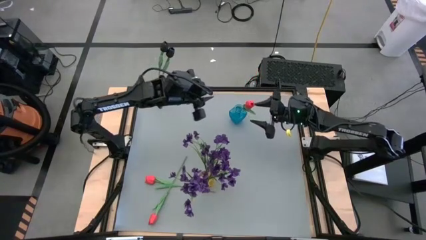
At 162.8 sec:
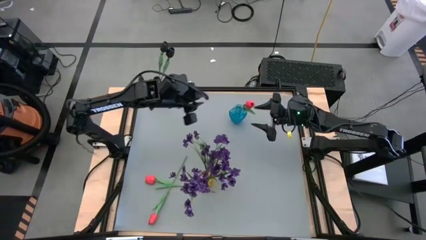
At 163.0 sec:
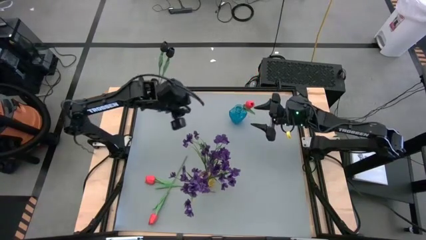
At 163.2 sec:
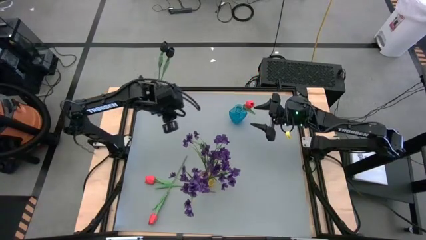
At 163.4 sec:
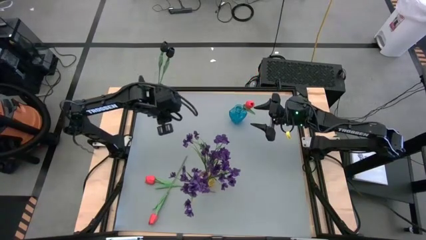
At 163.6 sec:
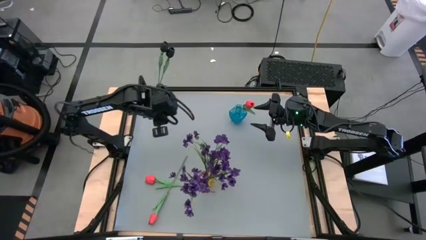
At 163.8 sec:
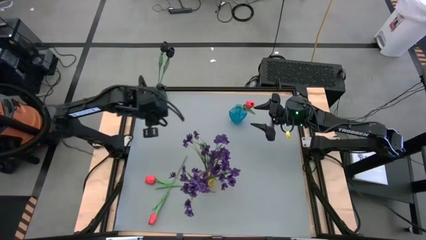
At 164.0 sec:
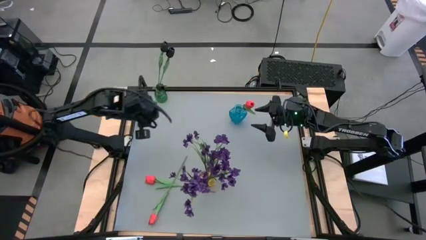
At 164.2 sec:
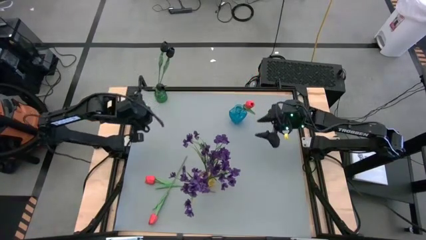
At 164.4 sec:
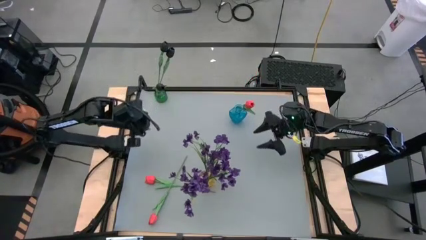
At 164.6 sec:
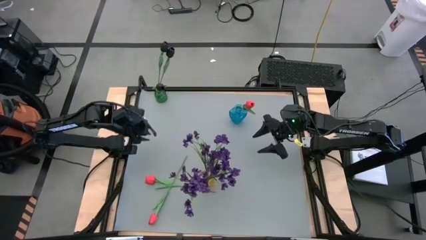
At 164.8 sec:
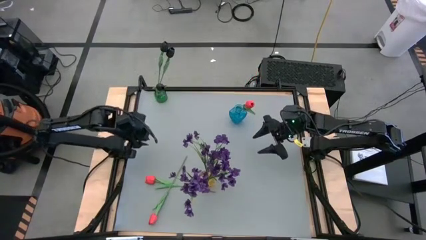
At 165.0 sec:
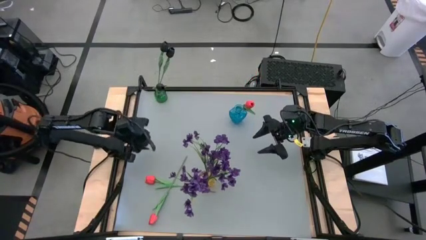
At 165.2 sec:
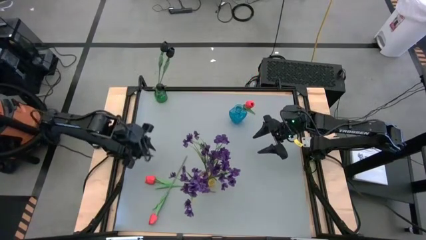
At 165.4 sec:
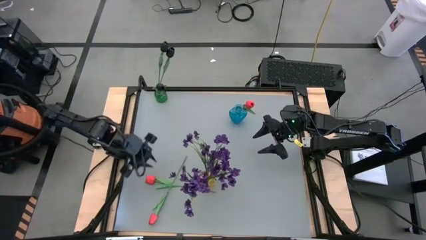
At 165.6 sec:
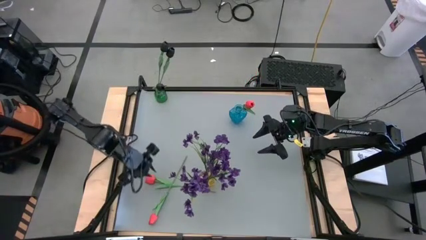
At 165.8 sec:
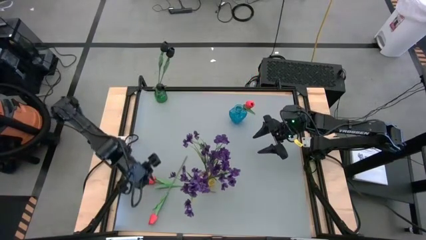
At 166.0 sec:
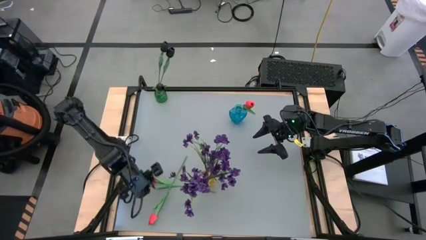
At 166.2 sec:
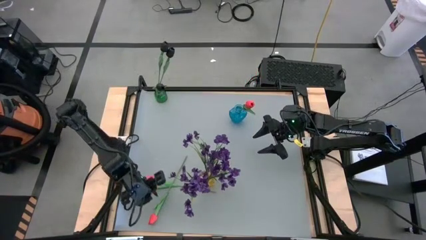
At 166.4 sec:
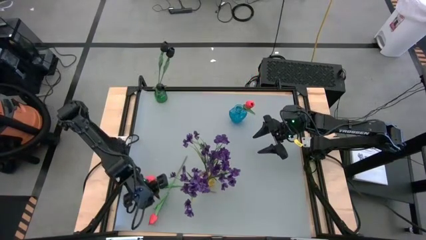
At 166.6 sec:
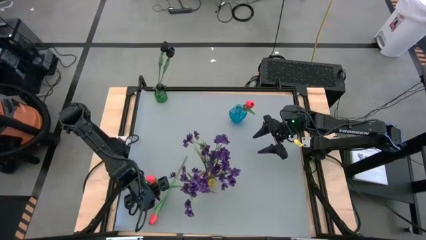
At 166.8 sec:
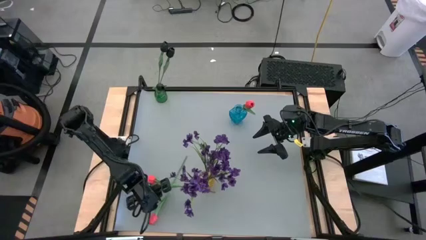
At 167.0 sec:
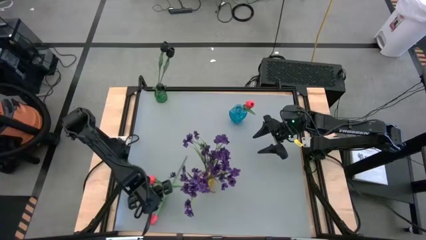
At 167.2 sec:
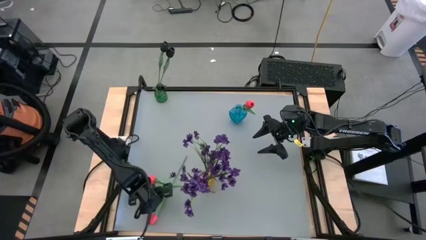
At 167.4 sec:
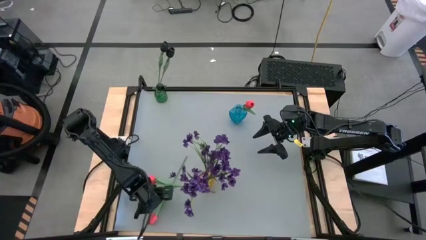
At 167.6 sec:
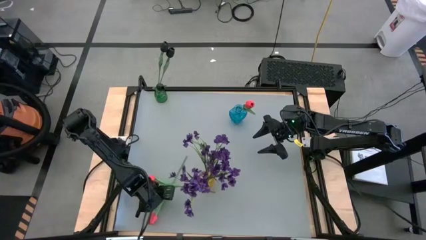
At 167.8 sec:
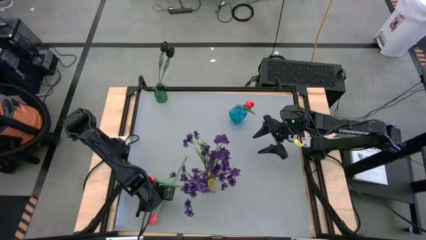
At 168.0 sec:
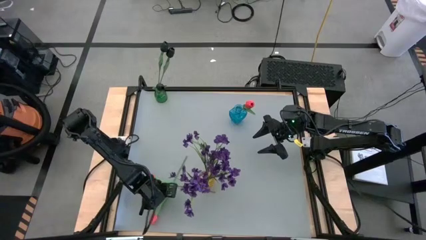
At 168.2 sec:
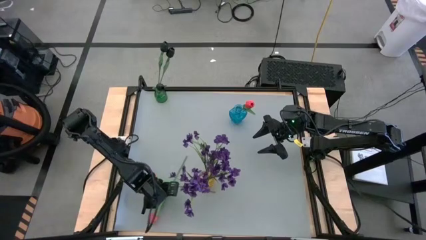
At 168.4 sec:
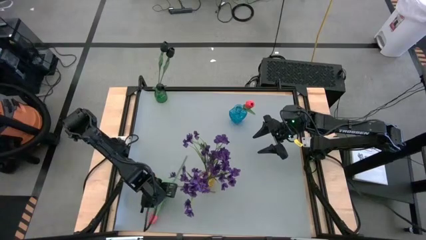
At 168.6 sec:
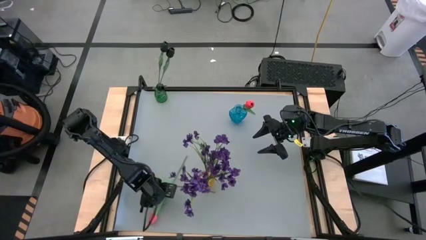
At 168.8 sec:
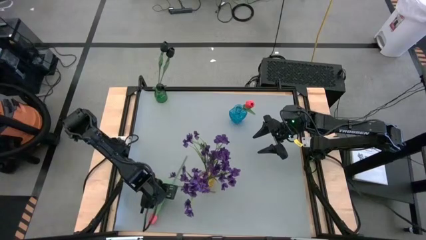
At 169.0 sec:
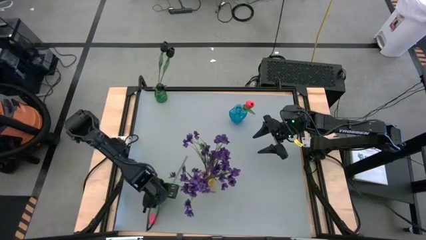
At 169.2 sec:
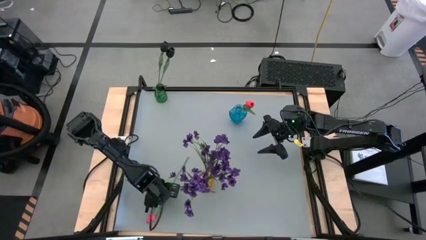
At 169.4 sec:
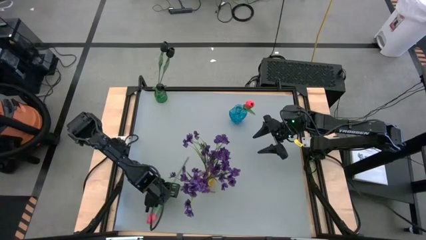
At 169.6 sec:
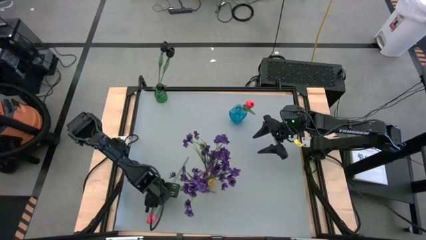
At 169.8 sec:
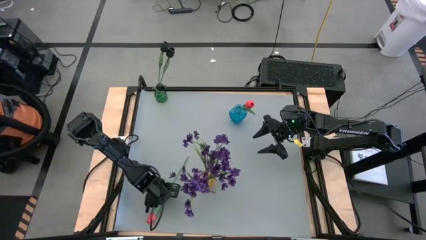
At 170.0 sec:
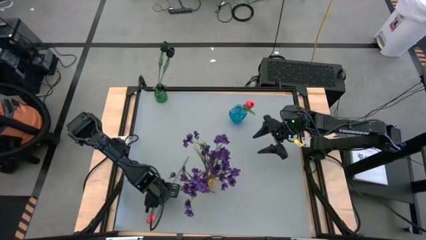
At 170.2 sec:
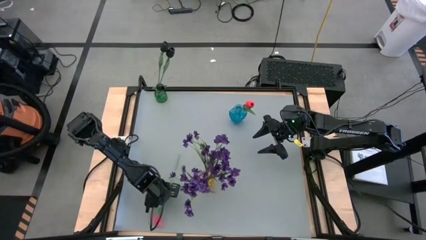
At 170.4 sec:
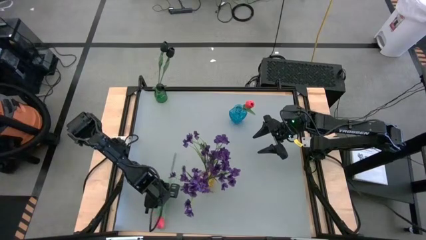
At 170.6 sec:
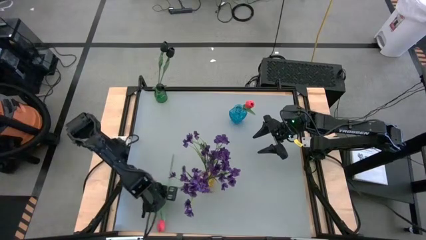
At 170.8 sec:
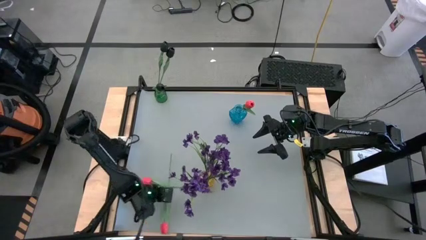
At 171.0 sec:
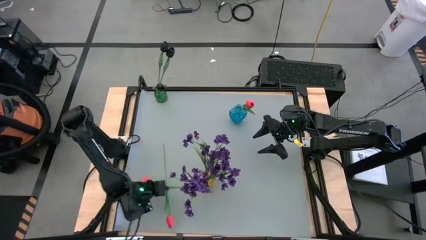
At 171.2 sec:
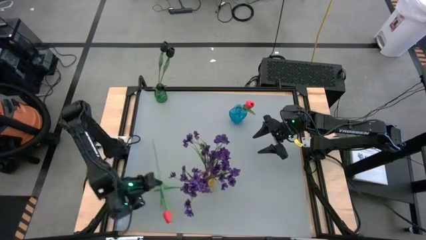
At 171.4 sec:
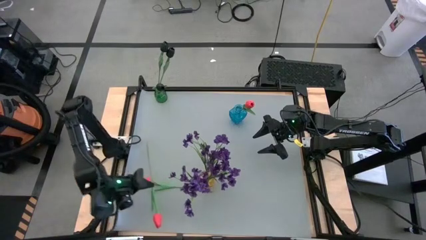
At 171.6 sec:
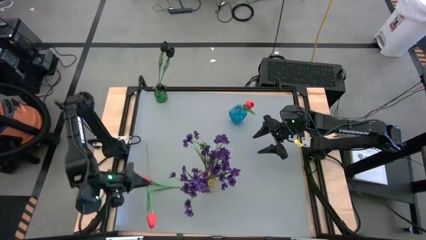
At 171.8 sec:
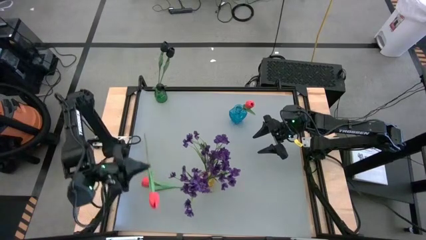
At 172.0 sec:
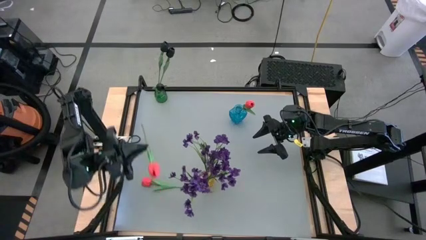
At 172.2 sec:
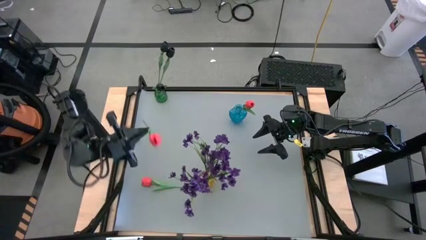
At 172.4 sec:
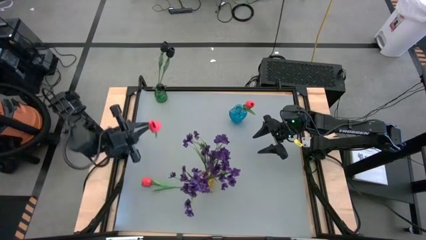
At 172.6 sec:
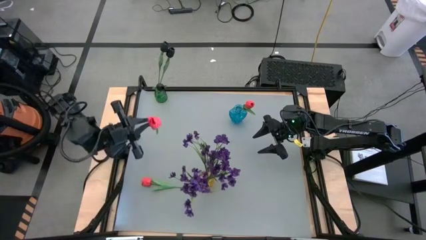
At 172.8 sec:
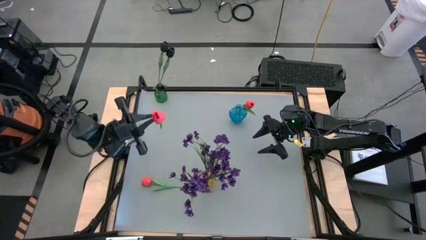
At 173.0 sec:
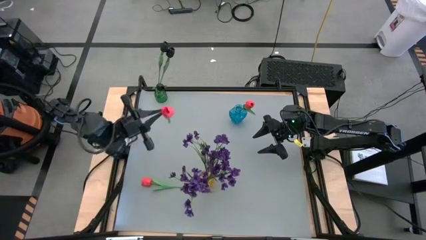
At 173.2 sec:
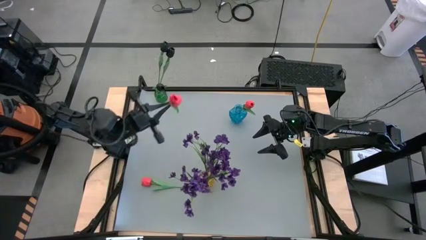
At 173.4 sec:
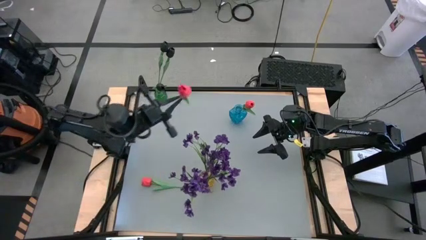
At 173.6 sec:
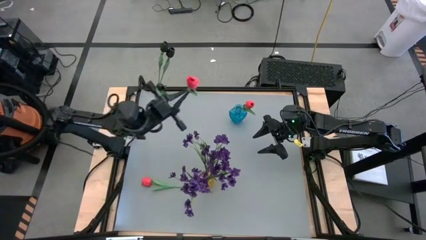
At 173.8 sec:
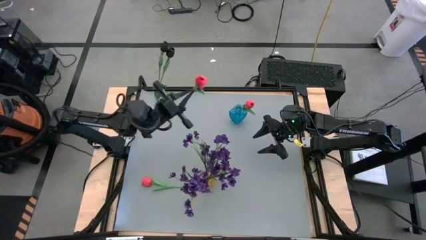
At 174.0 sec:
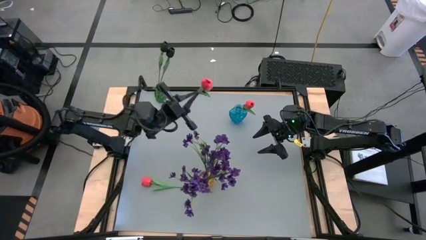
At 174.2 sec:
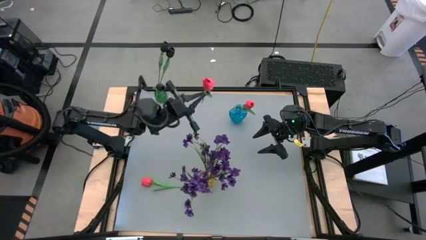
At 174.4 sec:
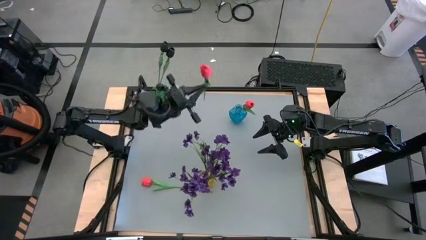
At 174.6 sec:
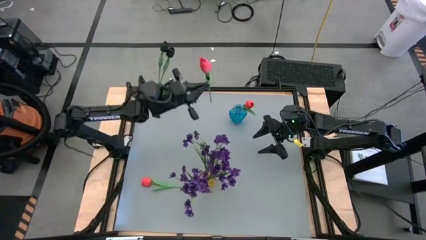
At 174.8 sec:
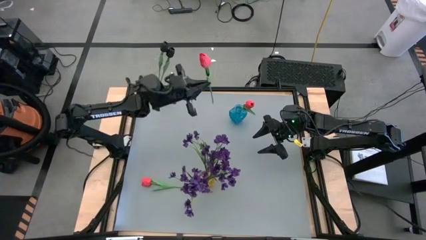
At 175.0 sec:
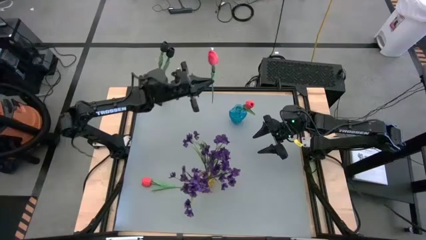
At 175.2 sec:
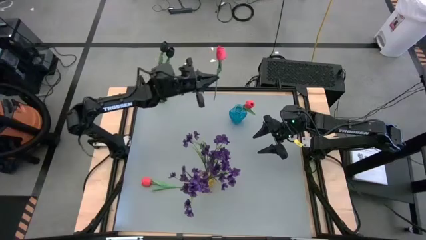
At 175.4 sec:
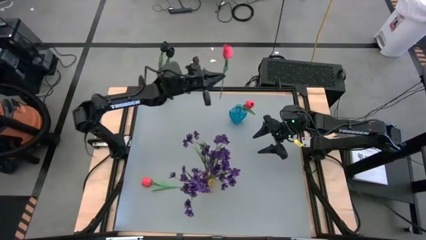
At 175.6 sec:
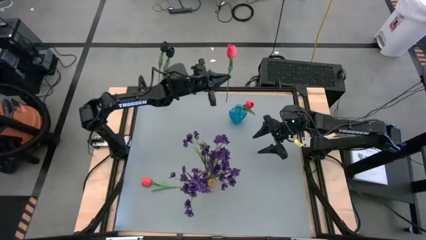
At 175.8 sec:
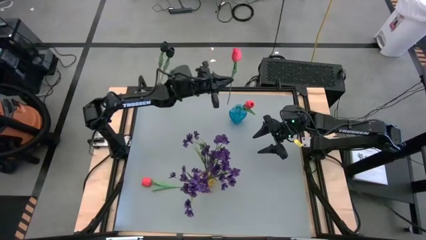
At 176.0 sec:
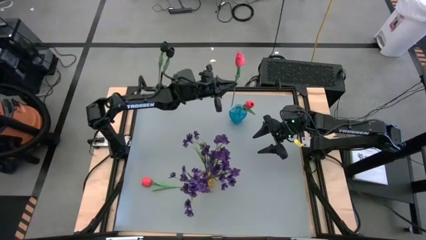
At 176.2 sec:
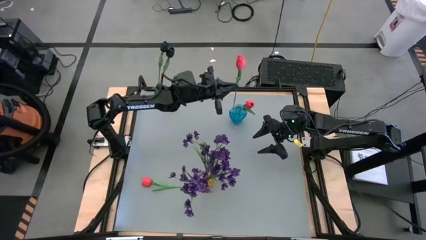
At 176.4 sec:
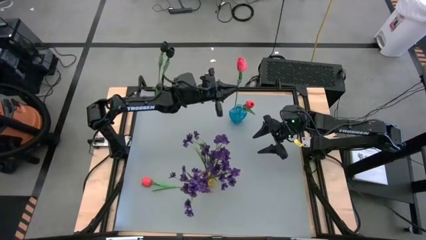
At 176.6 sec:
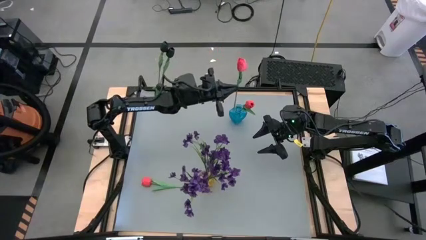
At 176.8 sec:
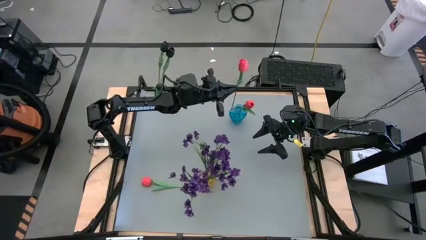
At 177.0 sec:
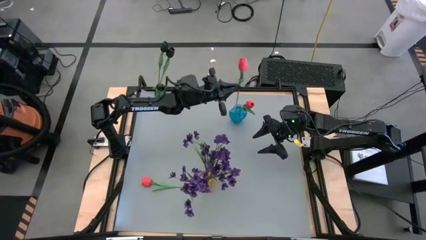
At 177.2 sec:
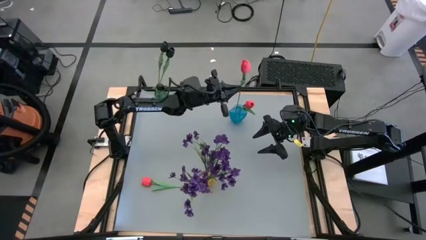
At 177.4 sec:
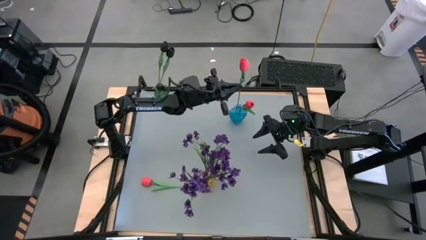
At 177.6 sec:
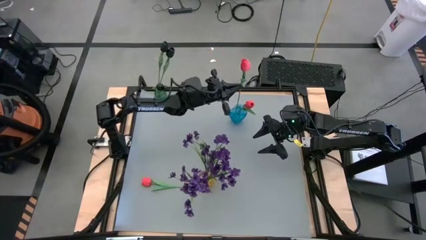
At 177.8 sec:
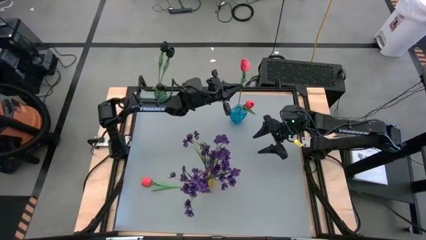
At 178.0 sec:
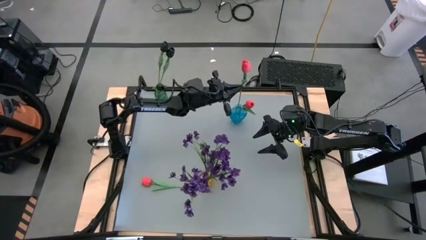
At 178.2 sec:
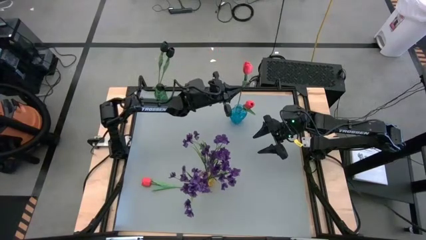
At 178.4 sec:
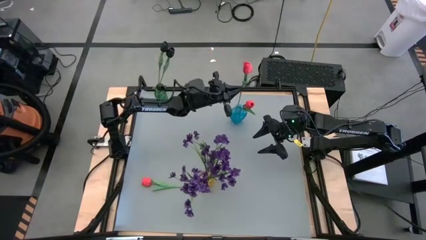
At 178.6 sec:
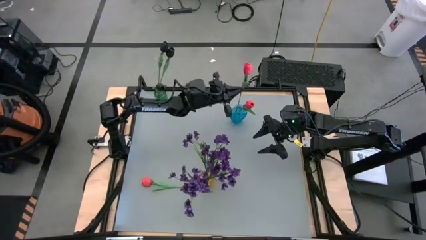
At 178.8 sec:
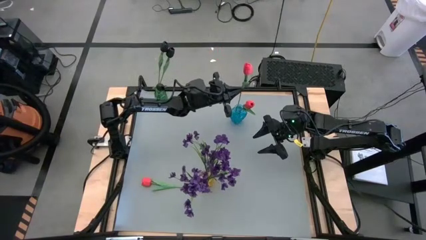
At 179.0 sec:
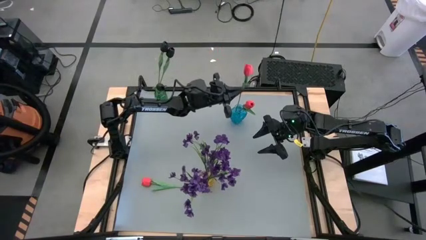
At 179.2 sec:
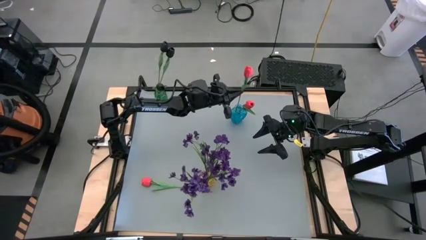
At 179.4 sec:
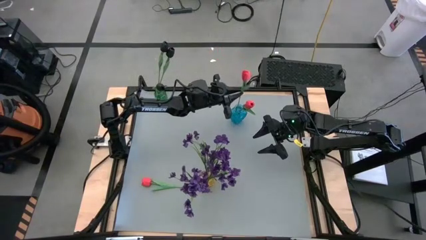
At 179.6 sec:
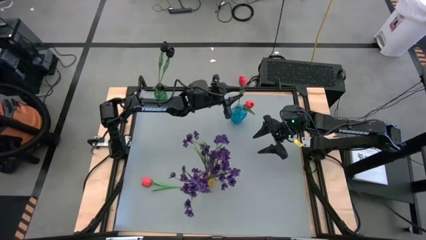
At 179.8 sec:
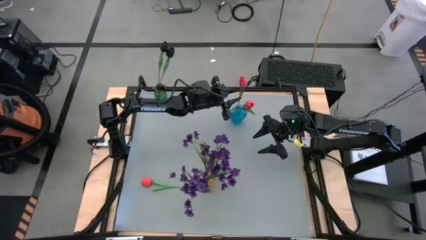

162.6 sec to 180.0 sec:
Task: Sort flowers into vase by color
Put the bottom pink flower into the blue vase
